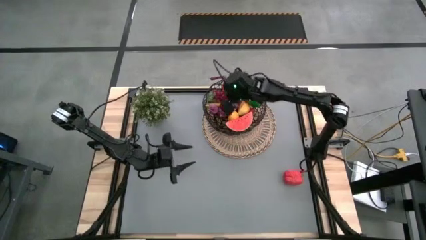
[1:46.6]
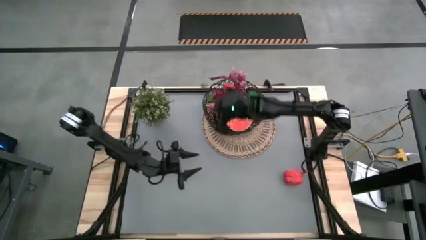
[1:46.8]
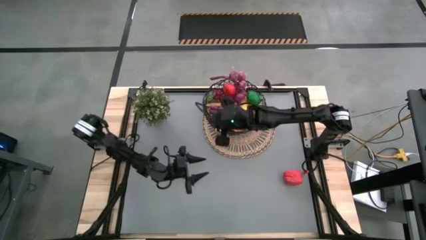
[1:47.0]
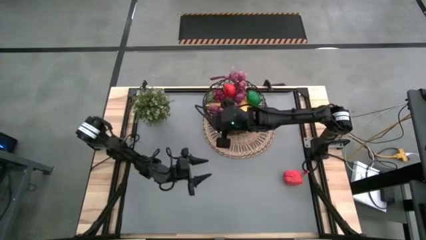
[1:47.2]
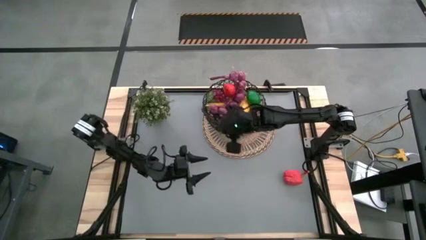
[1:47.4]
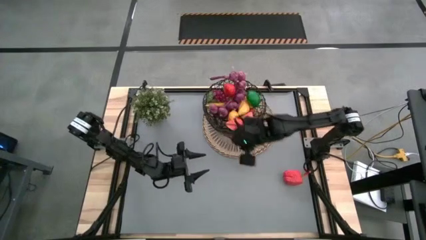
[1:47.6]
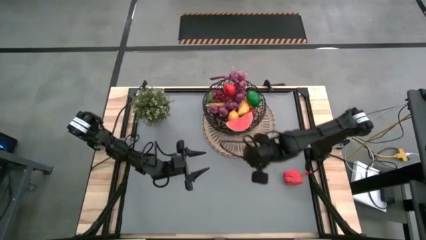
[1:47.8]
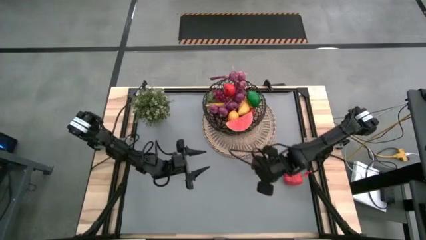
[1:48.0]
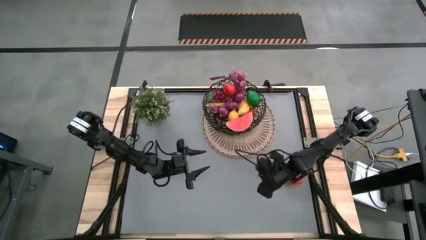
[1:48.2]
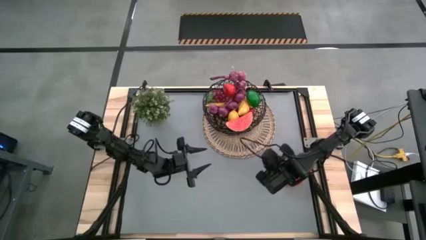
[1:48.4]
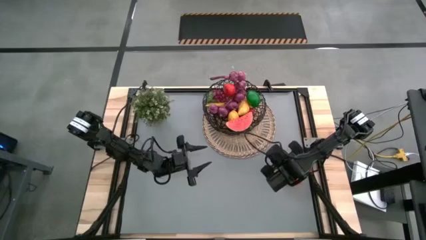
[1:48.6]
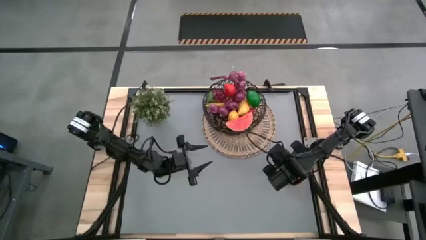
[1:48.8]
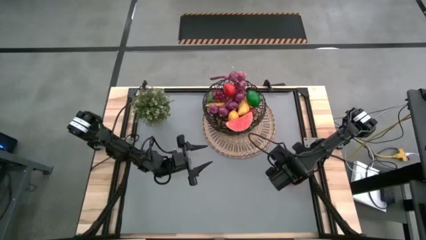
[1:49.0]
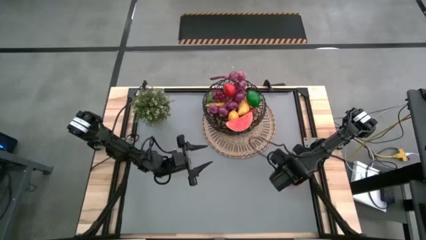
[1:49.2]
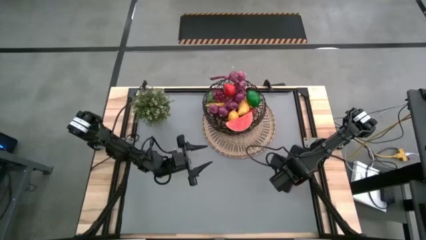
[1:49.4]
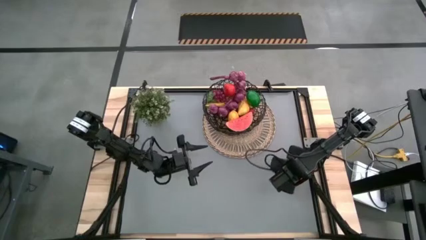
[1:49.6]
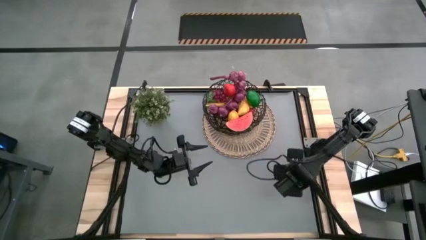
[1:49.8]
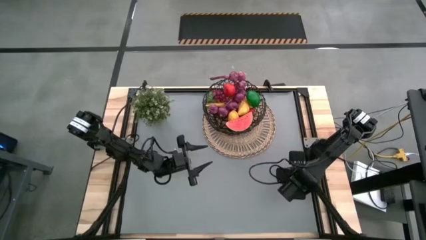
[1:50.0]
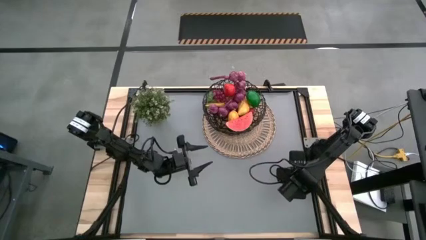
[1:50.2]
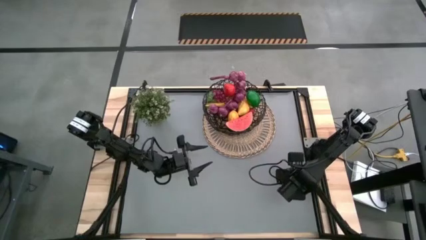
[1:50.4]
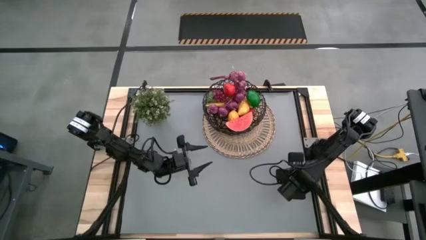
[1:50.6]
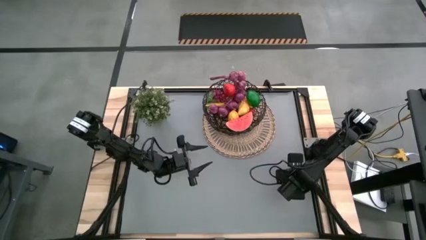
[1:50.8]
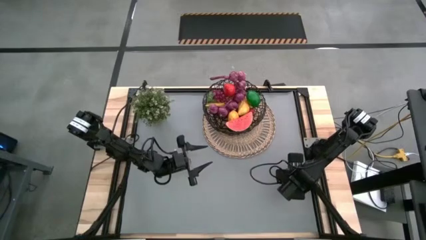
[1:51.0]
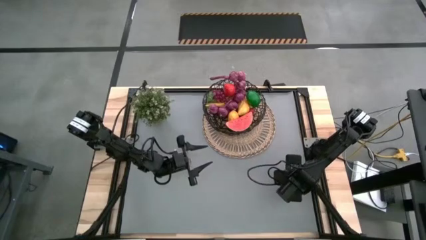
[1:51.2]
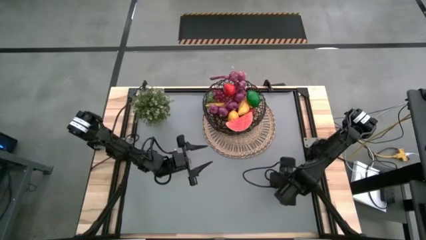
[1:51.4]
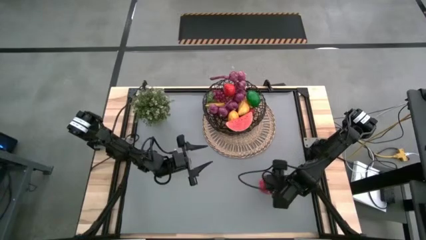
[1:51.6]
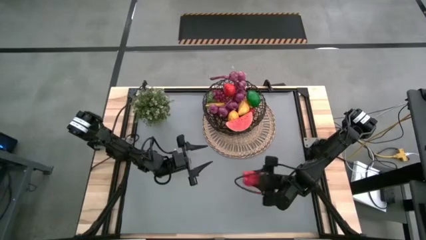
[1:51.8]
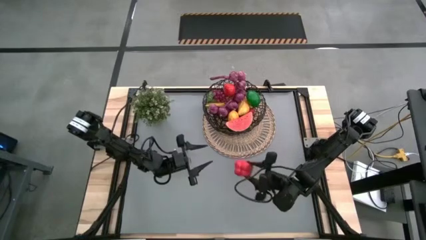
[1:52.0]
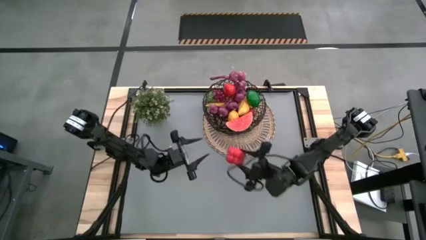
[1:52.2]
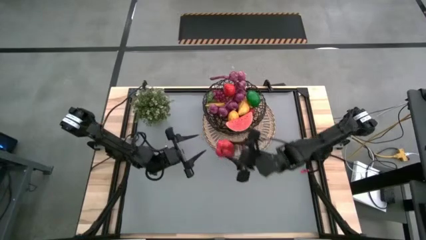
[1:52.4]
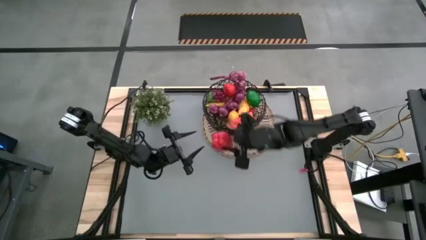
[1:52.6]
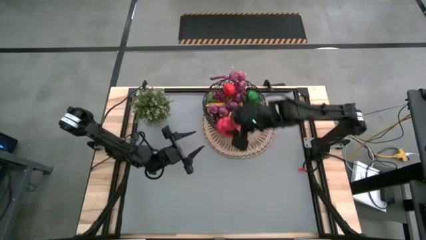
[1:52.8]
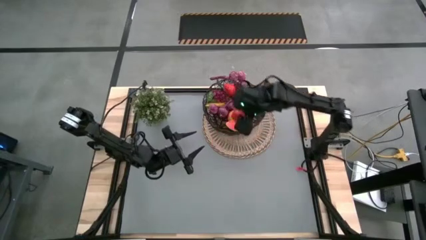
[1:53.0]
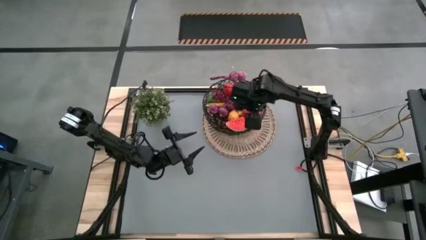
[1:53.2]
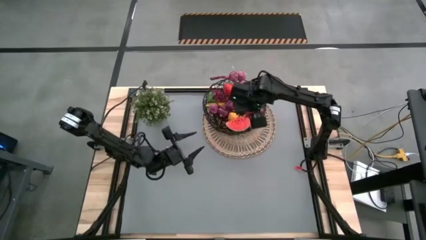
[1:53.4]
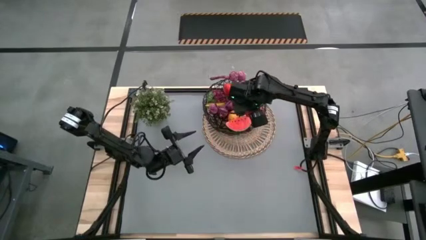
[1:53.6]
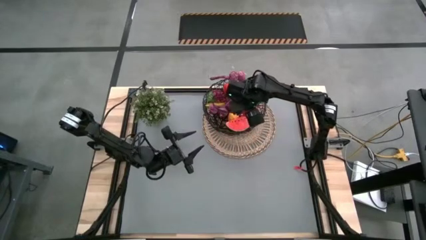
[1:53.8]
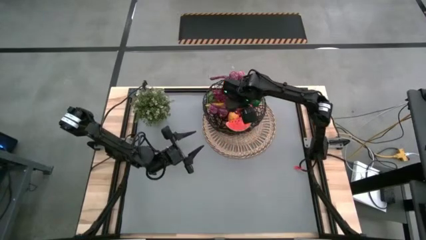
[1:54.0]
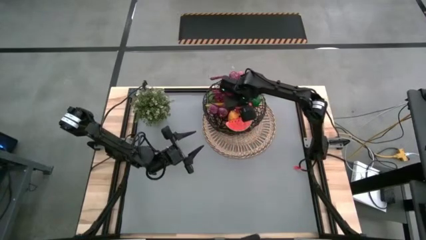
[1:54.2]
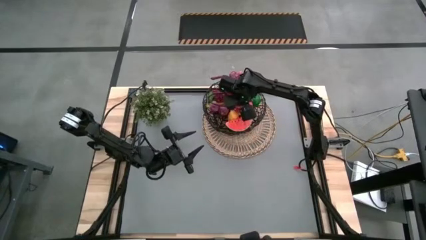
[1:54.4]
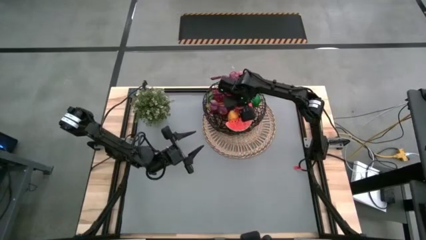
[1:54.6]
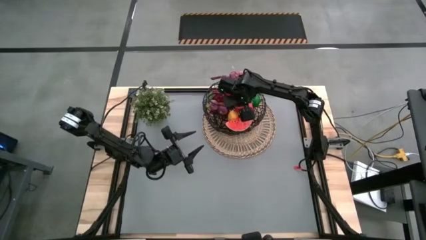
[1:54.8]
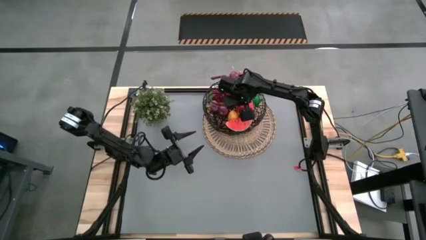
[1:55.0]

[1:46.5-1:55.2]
Task: Build produce basket
Put the red bell pepper into the black wire basket

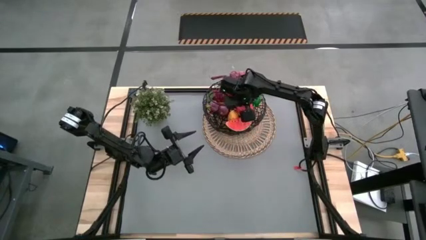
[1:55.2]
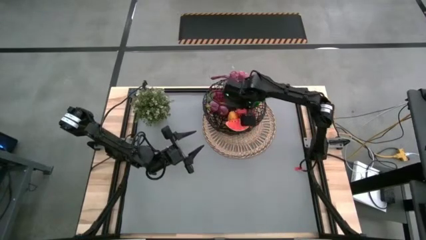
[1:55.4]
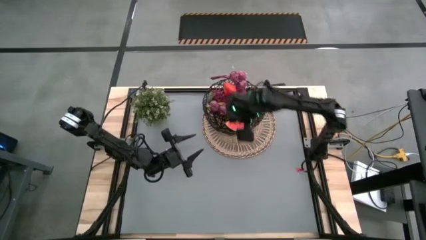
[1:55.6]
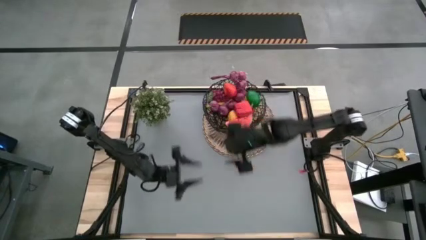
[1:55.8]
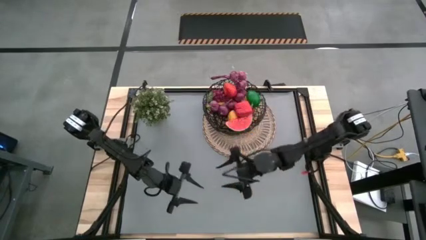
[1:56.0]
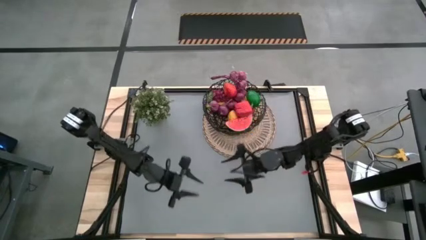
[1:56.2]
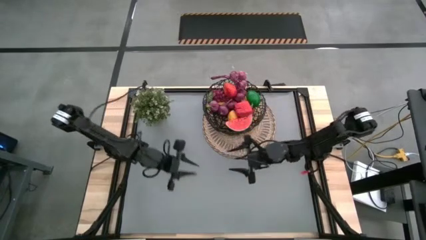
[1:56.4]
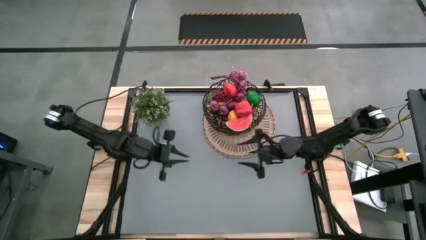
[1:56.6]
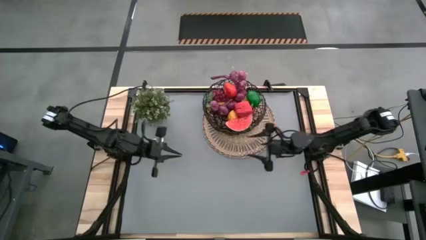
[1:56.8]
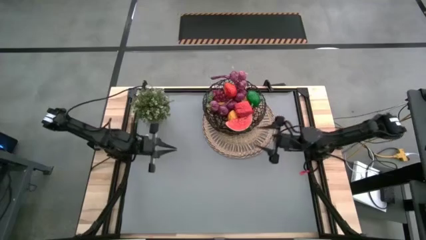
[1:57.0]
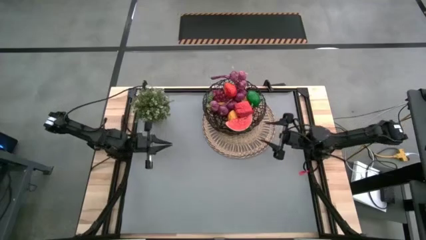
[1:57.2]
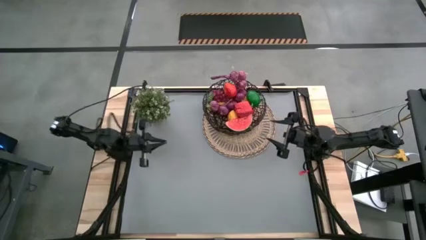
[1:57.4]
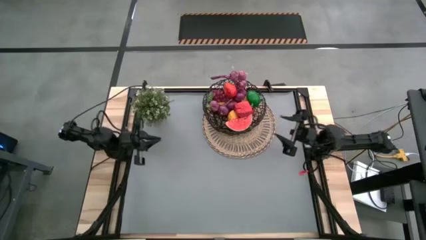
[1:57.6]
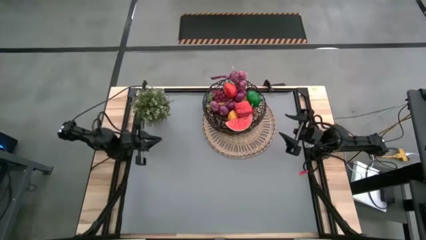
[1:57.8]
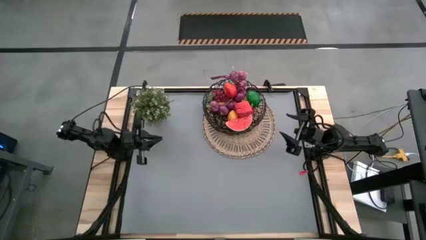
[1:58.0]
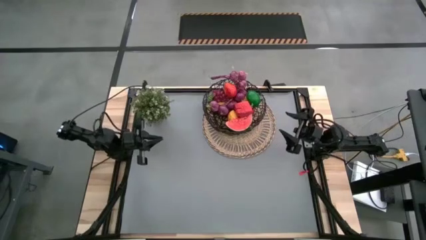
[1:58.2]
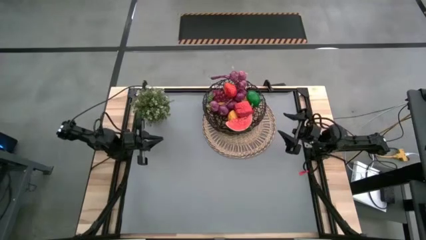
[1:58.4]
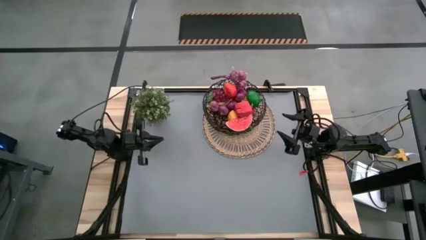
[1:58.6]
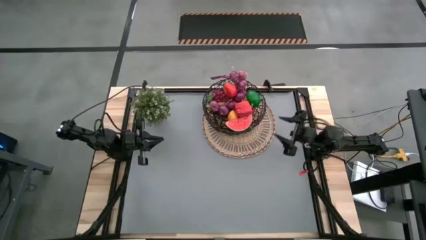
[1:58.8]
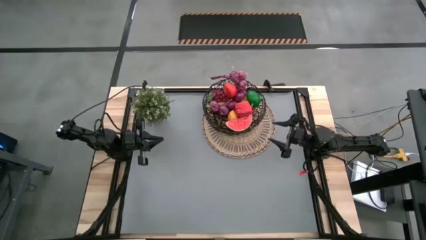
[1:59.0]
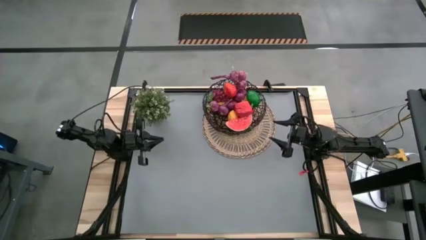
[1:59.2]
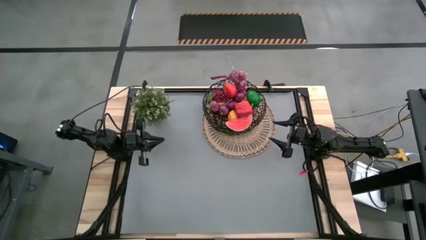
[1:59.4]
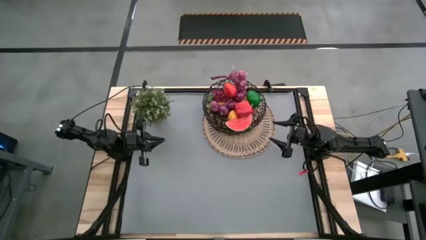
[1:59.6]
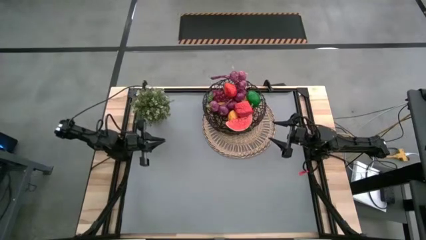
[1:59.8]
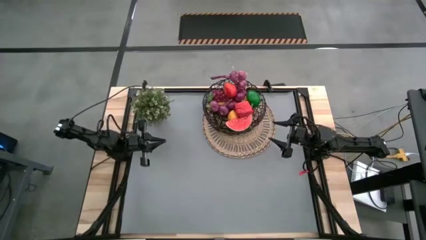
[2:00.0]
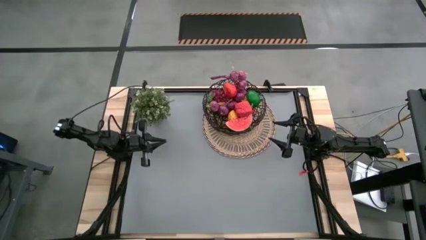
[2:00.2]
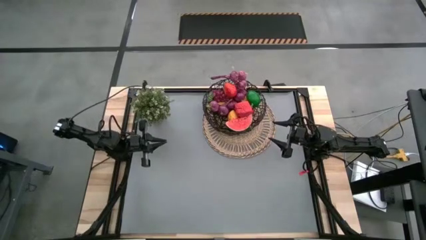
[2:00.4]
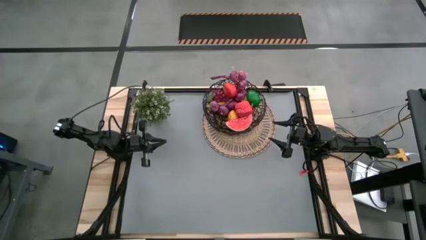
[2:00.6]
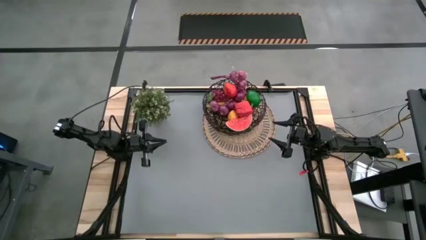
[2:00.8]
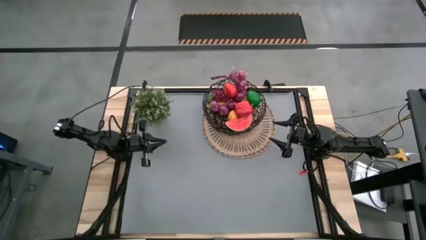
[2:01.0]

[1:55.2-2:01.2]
Return to Home Position
